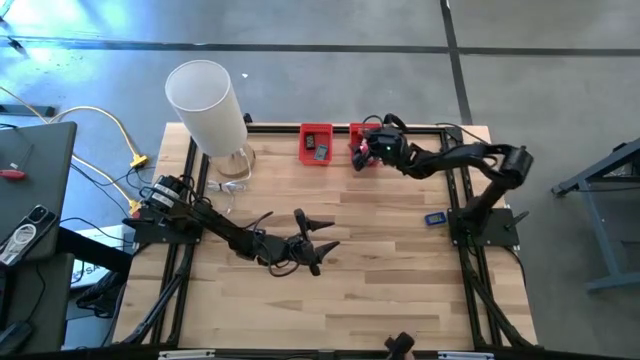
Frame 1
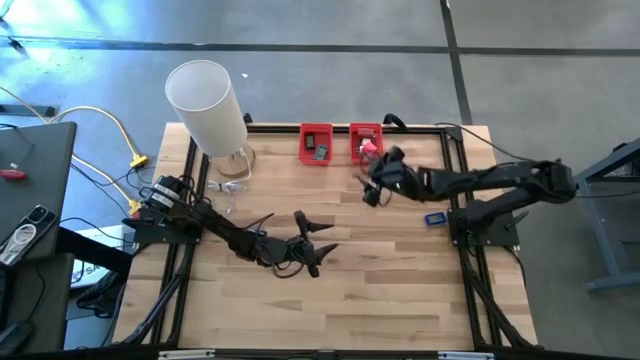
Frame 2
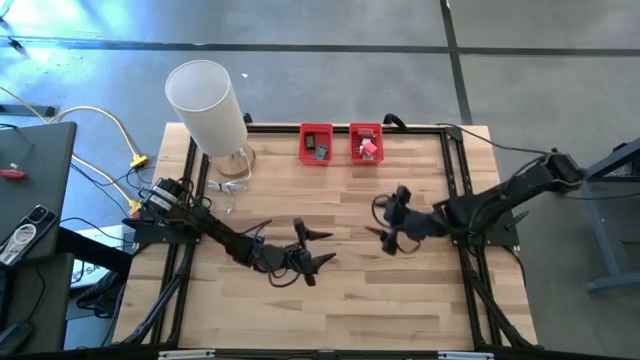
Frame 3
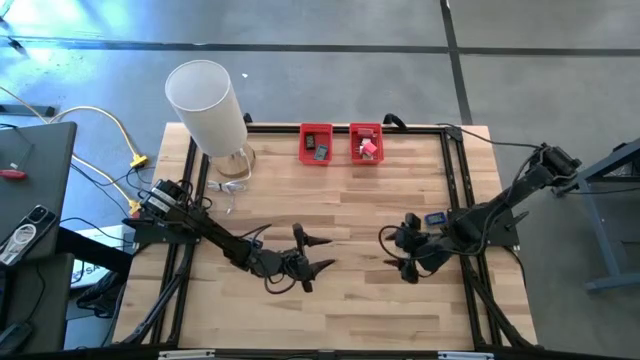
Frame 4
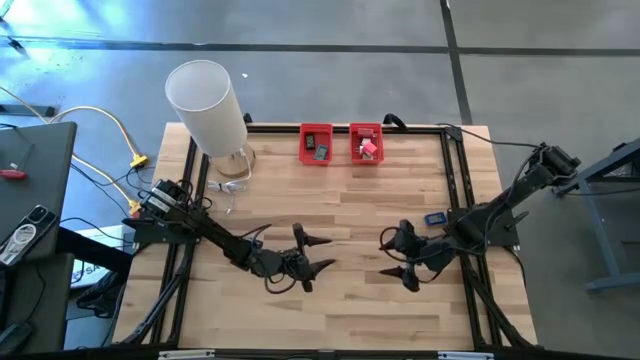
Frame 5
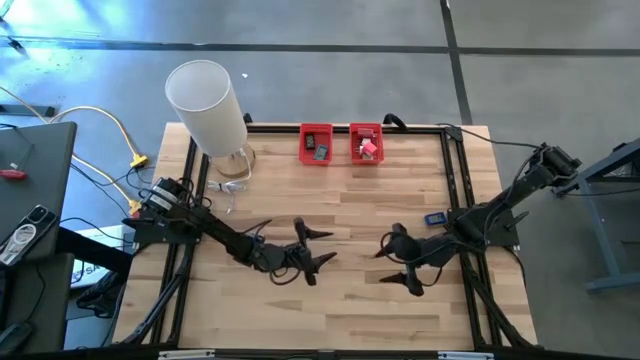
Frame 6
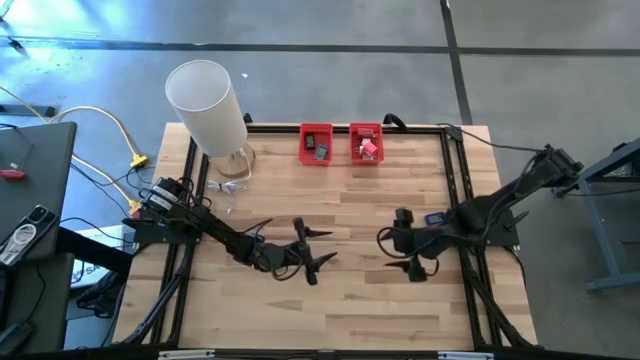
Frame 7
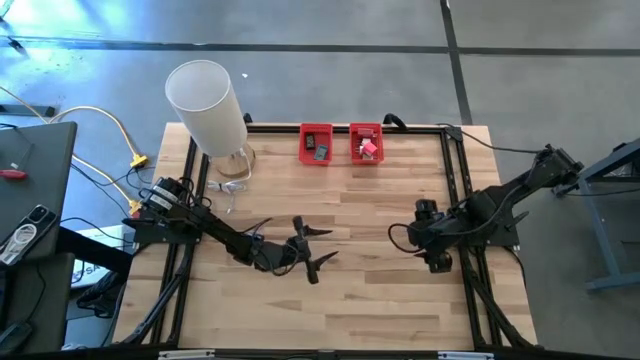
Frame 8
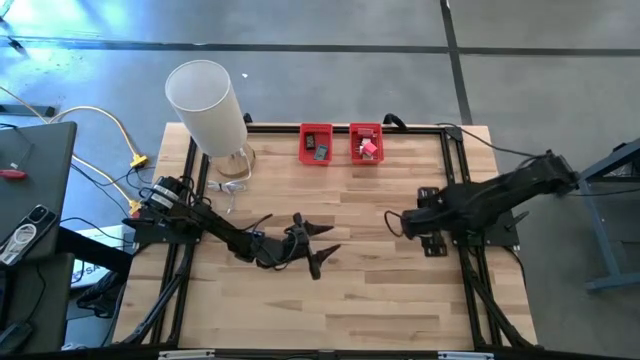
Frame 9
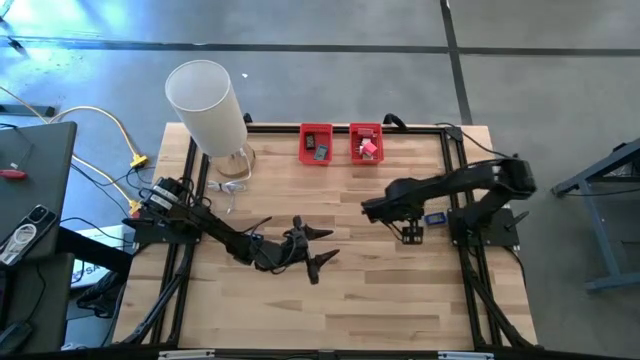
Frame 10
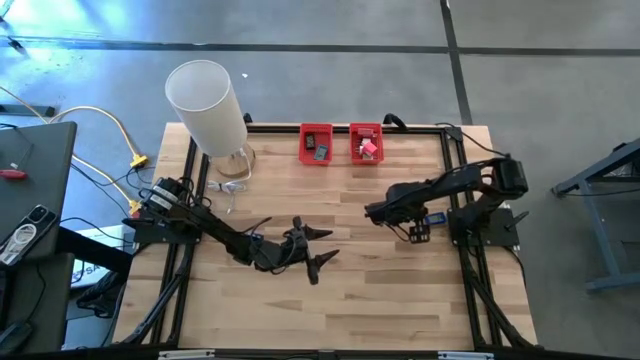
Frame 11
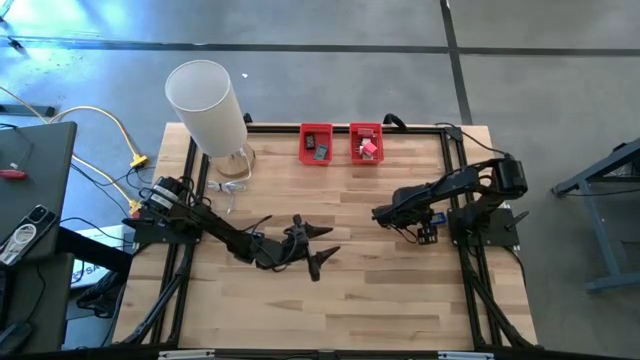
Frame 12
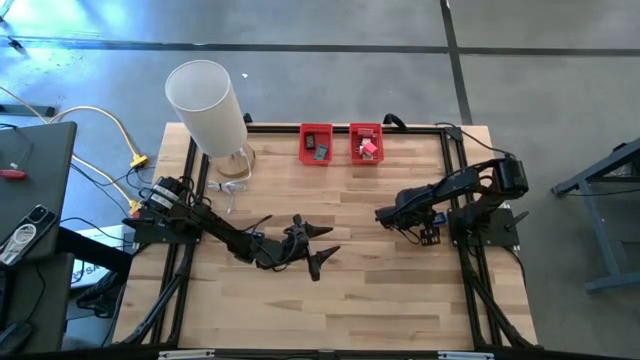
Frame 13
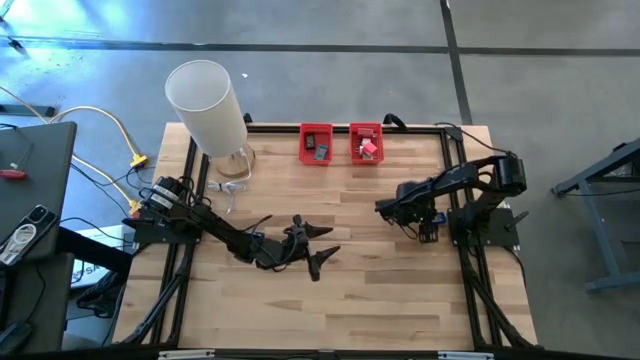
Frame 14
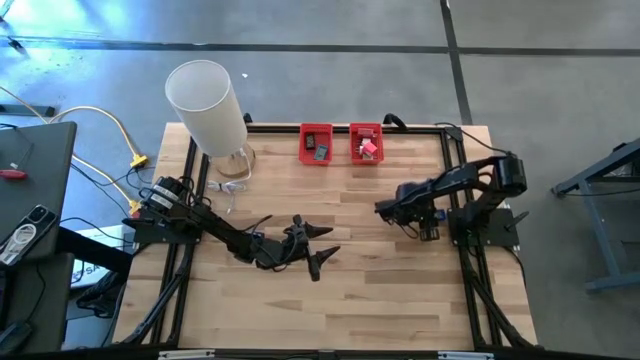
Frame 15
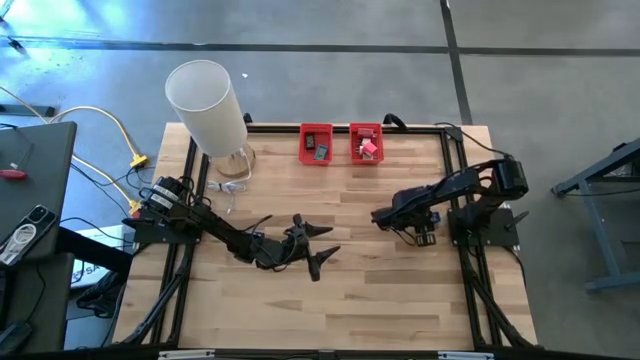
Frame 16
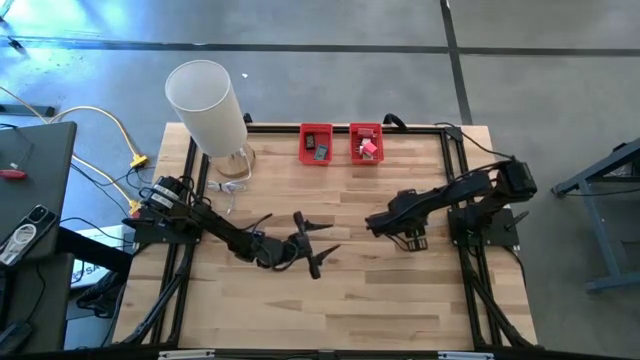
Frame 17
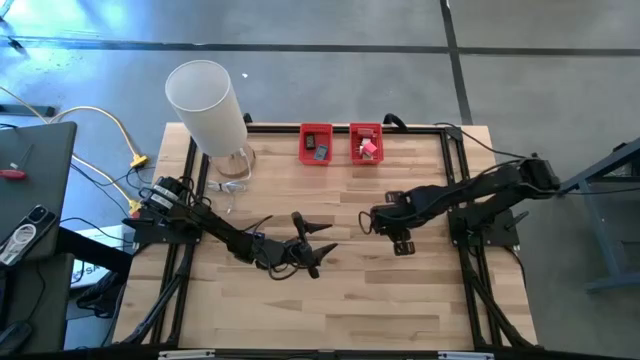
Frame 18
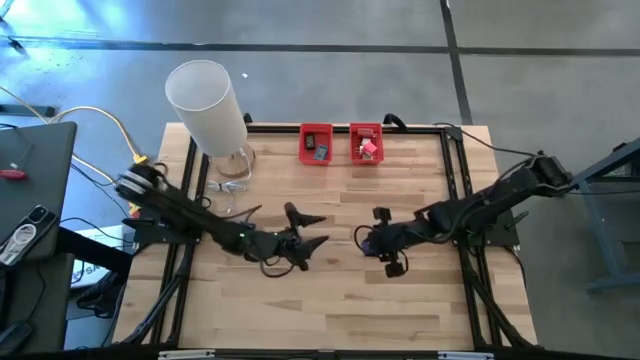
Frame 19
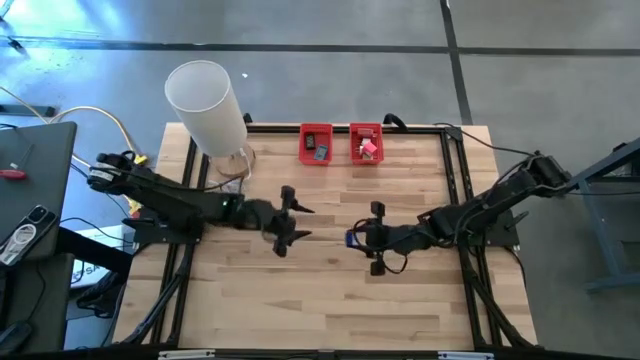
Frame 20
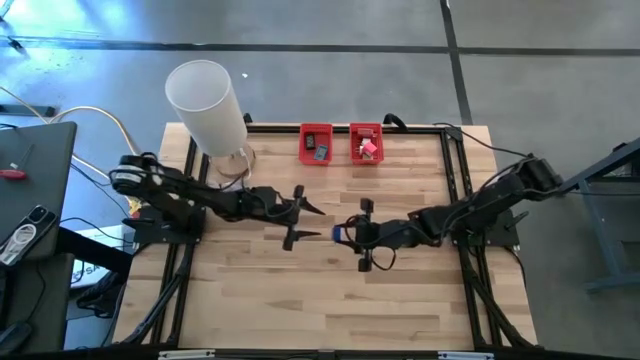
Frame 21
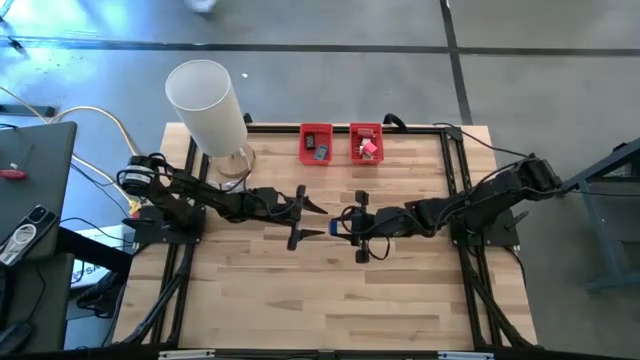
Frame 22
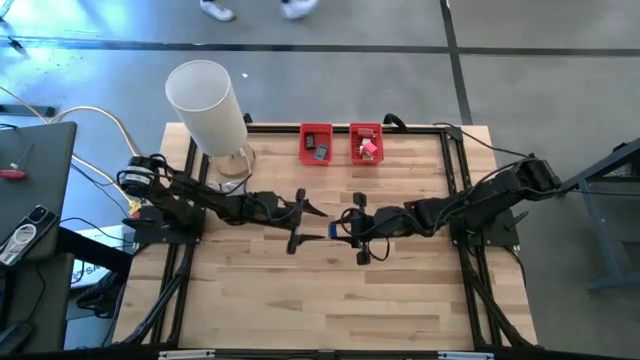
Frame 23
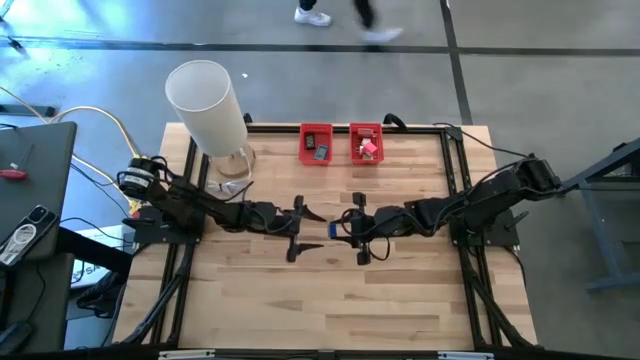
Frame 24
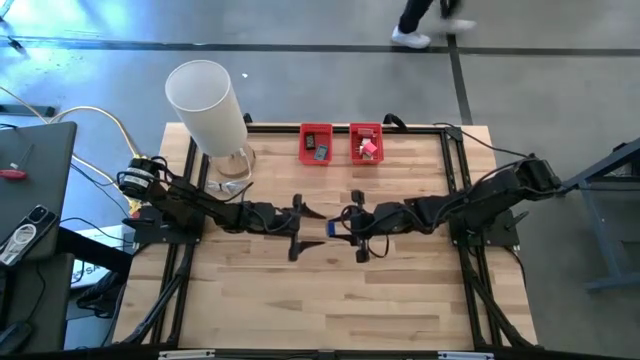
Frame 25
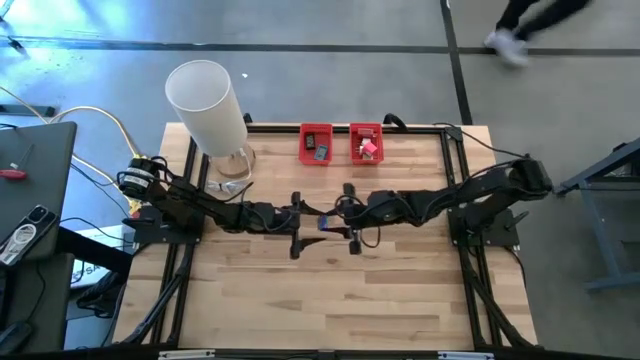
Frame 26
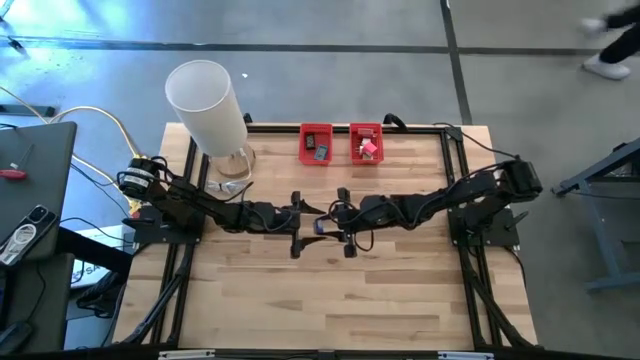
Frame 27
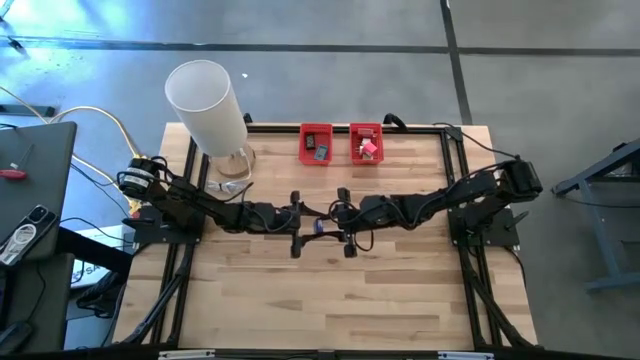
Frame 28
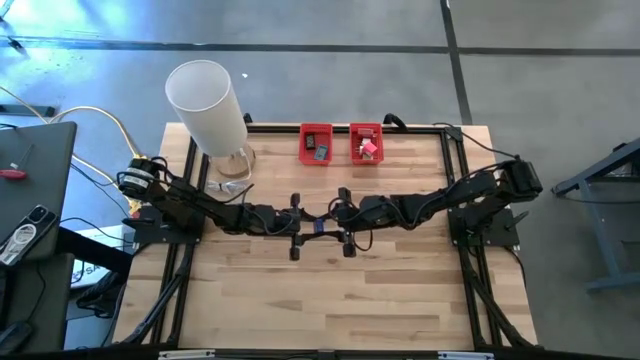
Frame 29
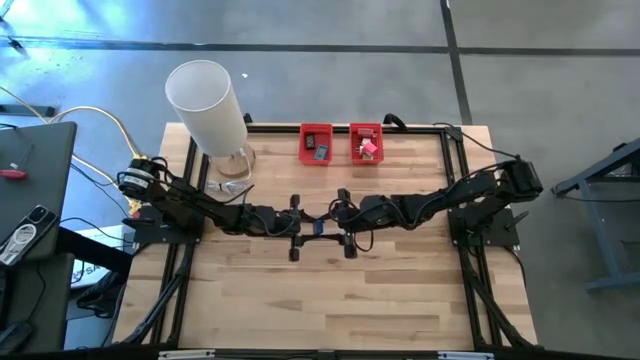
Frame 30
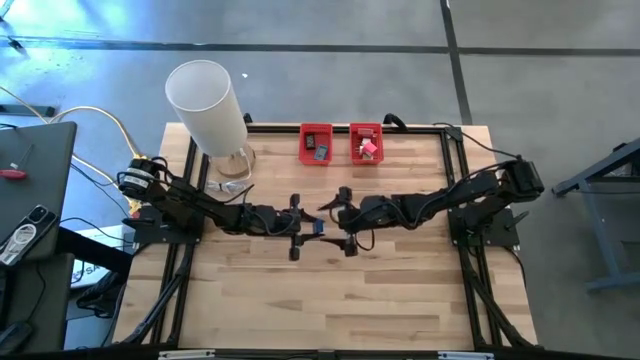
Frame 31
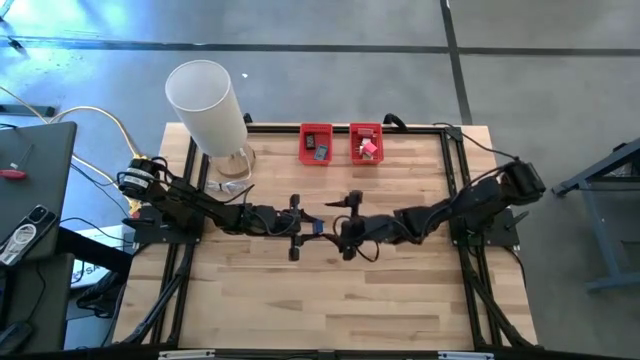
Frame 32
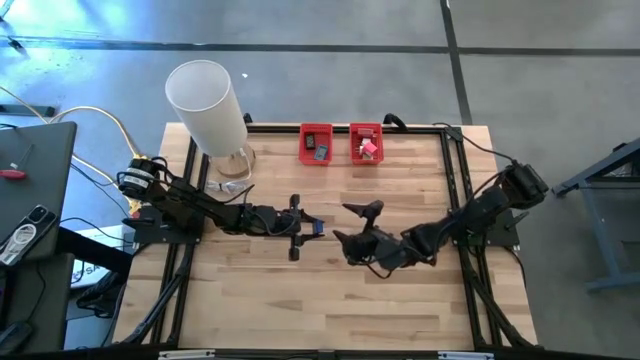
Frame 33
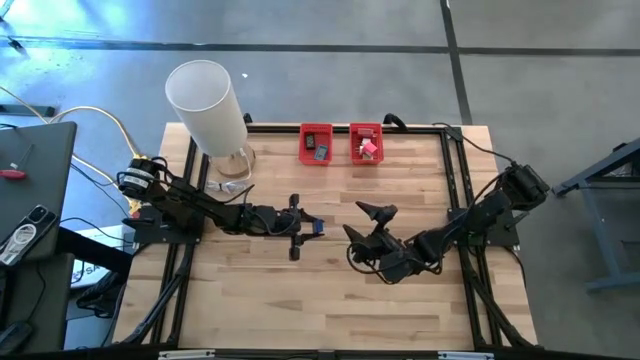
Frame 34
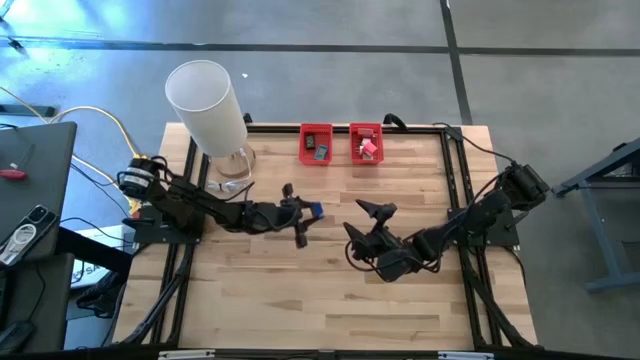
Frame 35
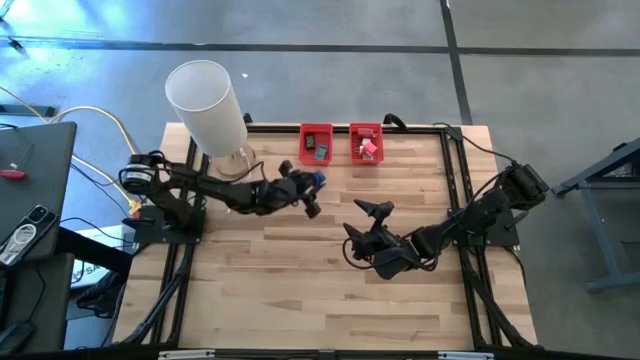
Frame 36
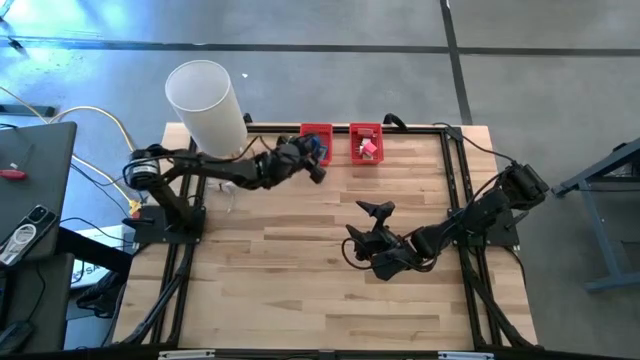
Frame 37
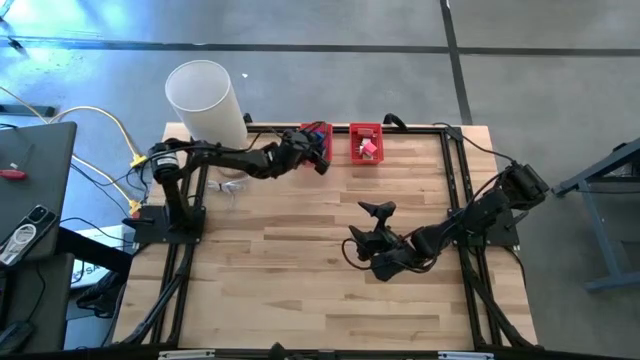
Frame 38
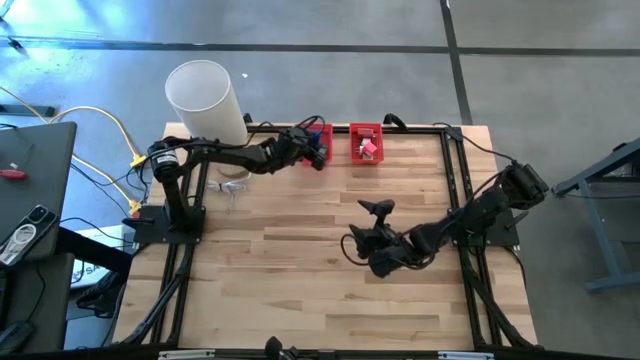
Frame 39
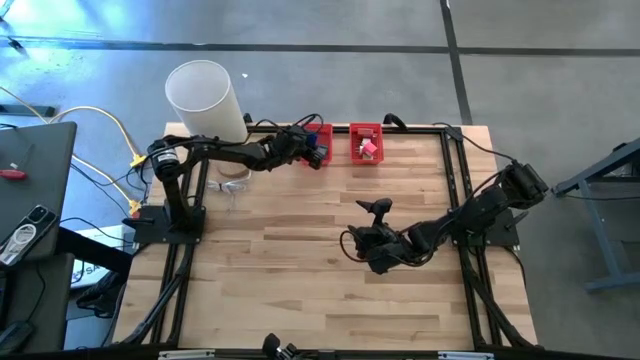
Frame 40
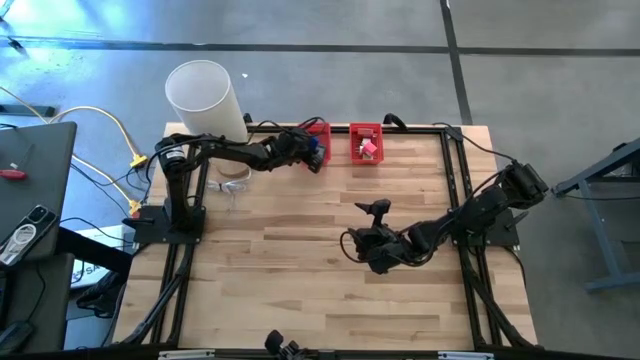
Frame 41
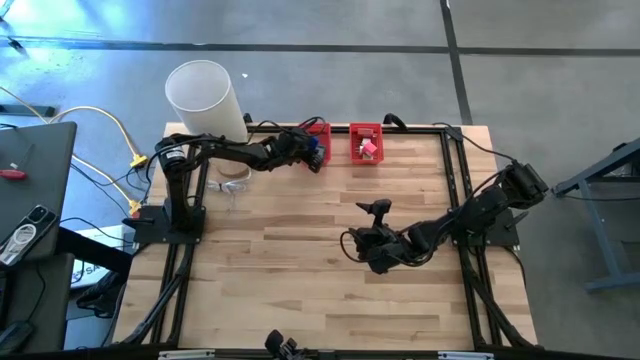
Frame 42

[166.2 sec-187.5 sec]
Task: Pick & Place Office items
Put the blue timer into the left red bin

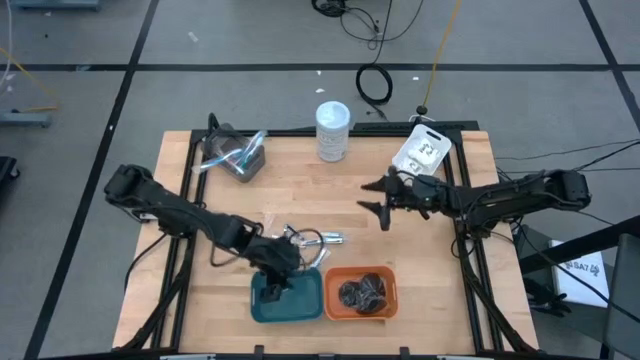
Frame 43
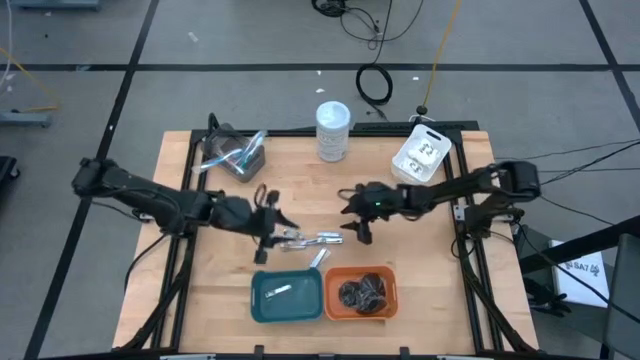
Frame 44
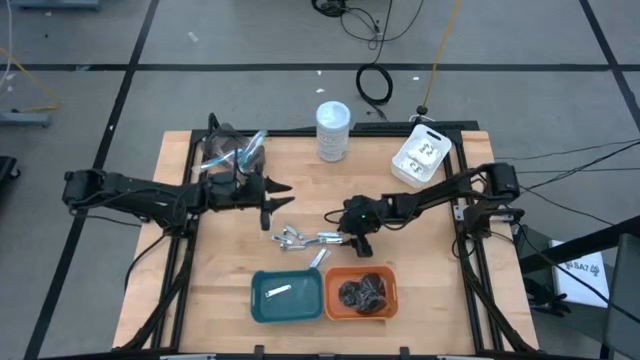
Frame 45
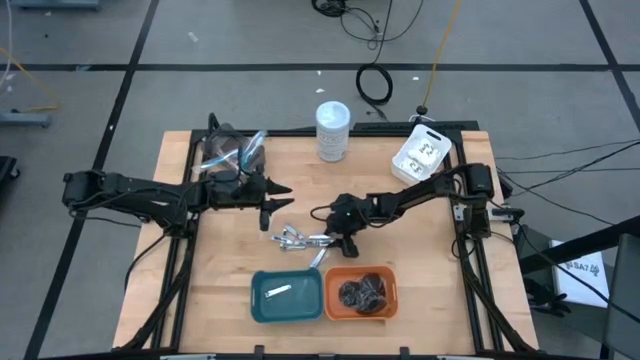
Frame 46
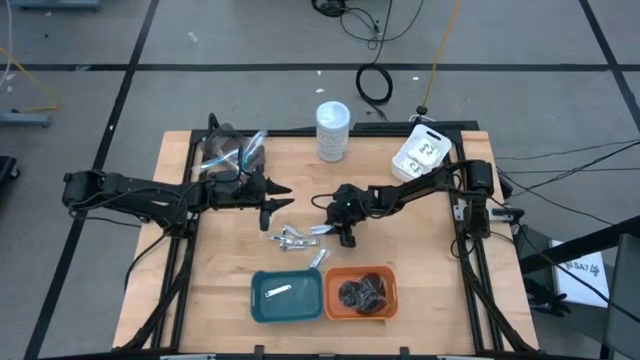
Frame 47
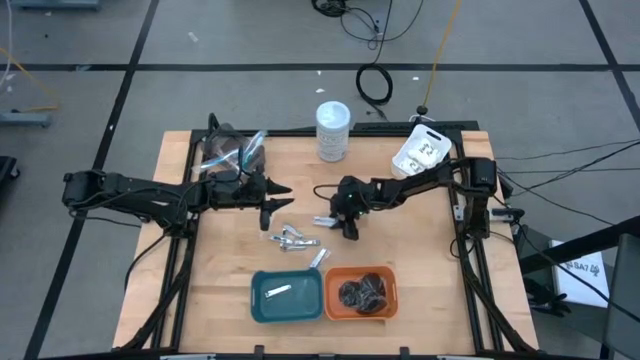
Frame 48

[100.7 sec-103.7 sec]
Task: Pick & Place Travel size toiletries
Put the silver nail cutter into the green bin
